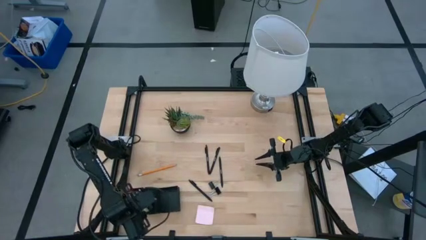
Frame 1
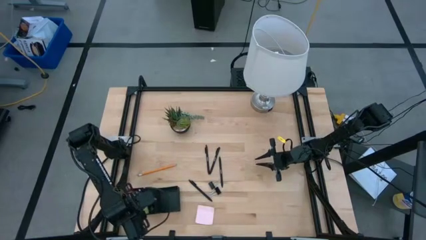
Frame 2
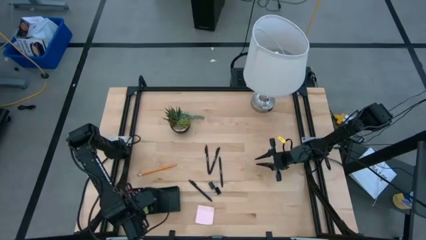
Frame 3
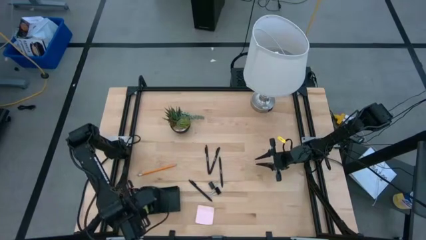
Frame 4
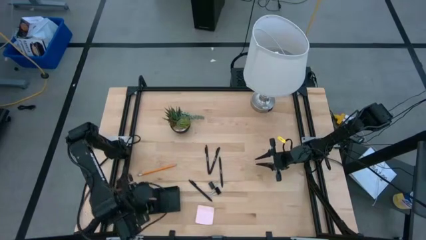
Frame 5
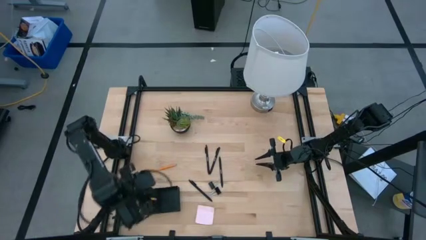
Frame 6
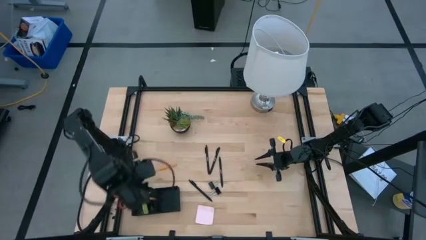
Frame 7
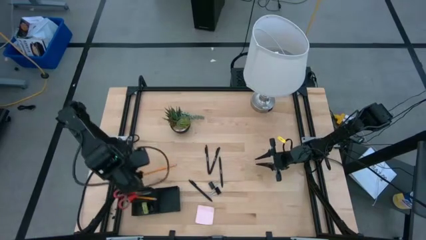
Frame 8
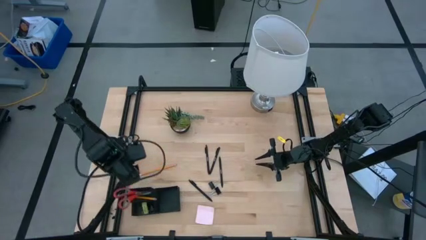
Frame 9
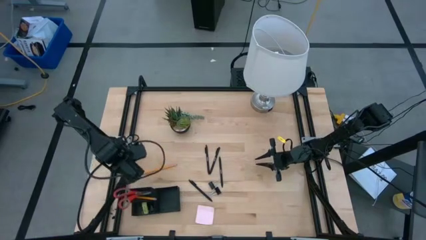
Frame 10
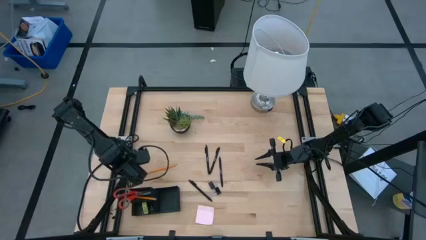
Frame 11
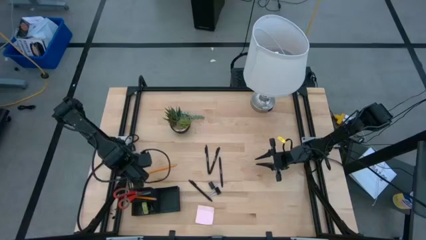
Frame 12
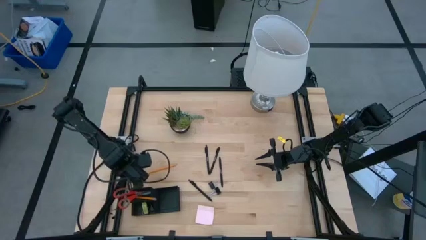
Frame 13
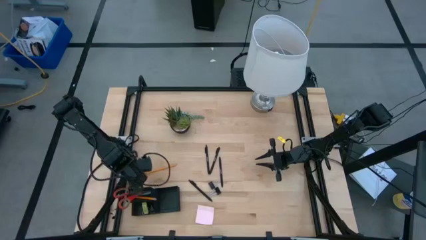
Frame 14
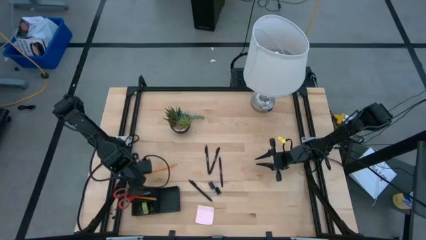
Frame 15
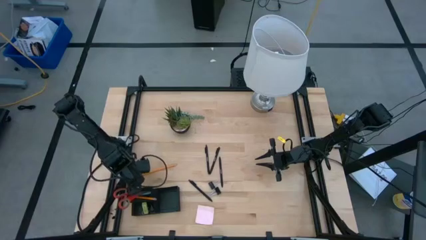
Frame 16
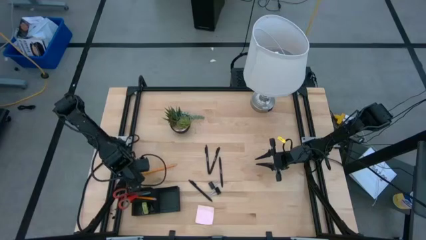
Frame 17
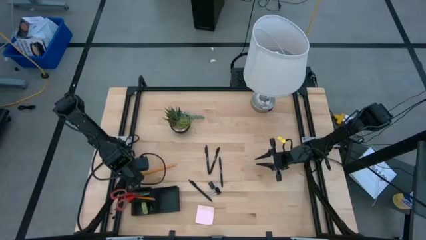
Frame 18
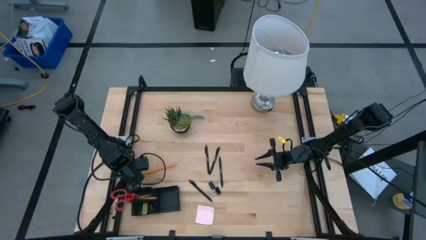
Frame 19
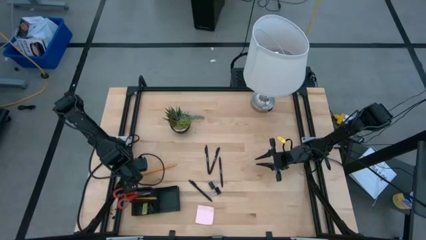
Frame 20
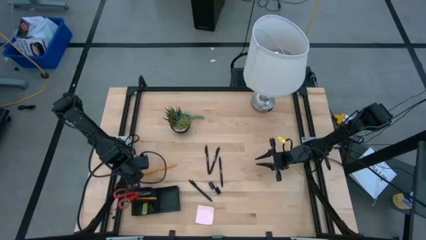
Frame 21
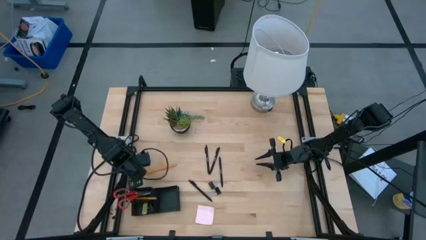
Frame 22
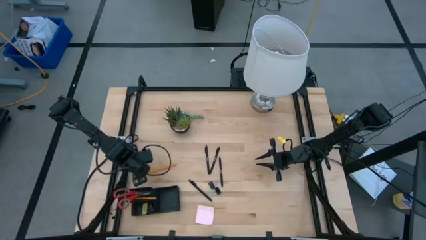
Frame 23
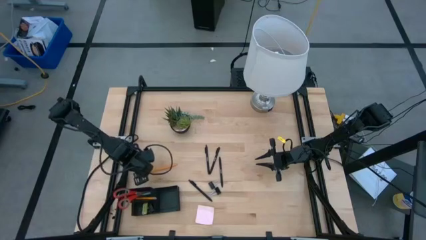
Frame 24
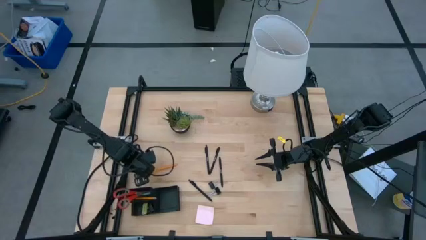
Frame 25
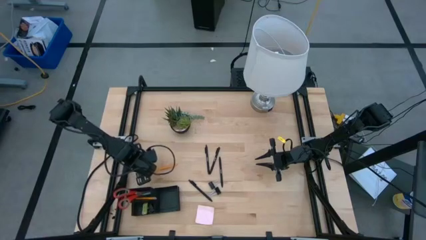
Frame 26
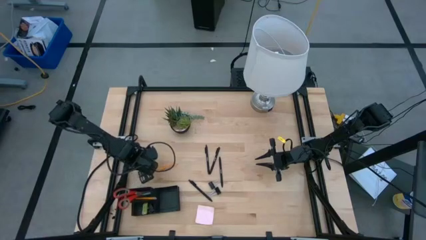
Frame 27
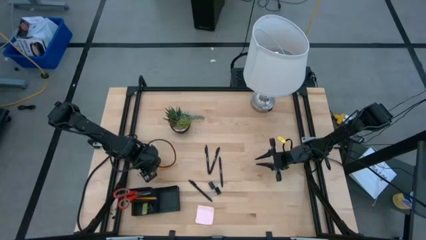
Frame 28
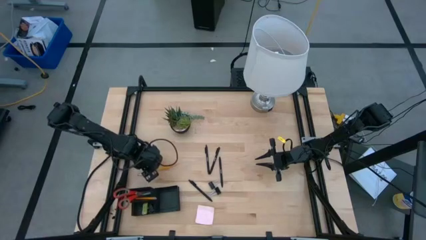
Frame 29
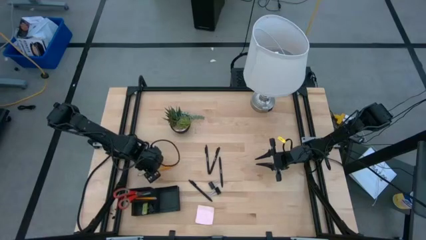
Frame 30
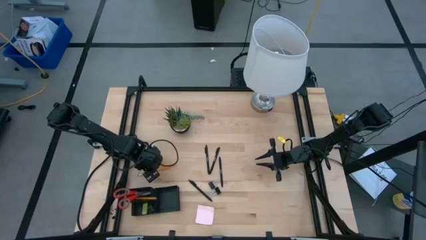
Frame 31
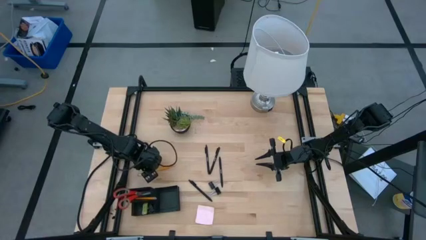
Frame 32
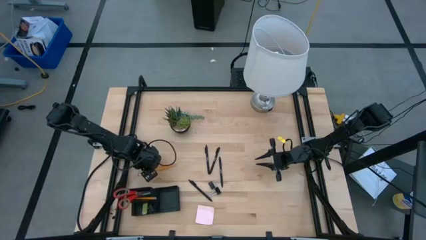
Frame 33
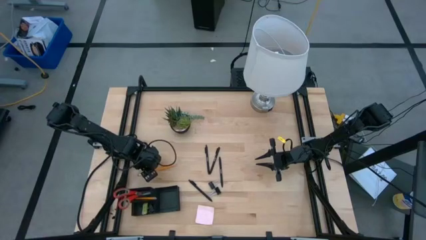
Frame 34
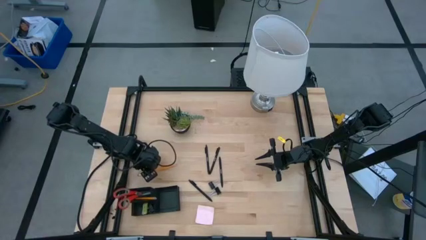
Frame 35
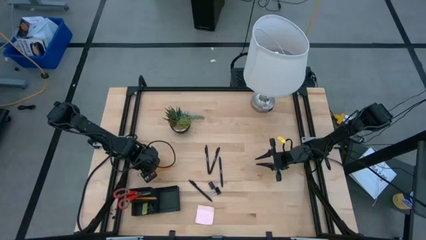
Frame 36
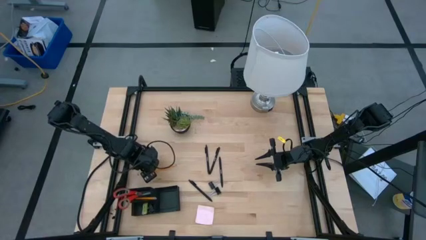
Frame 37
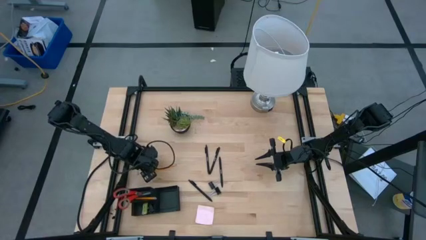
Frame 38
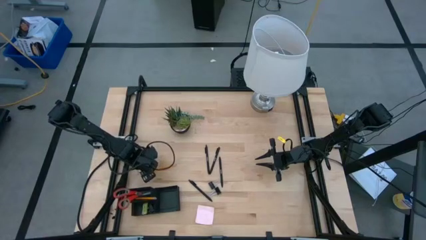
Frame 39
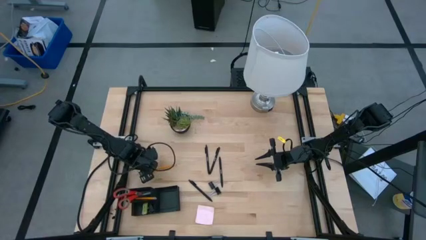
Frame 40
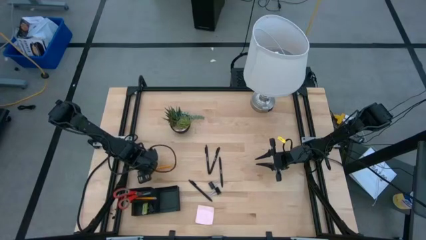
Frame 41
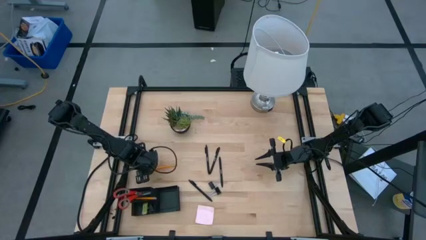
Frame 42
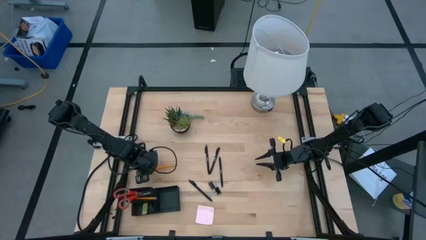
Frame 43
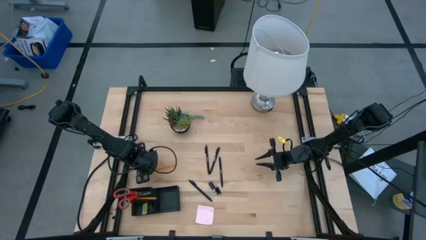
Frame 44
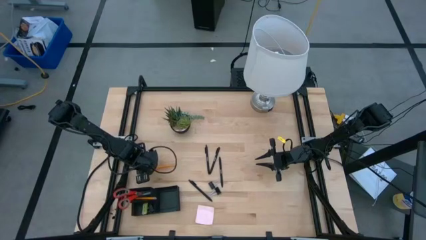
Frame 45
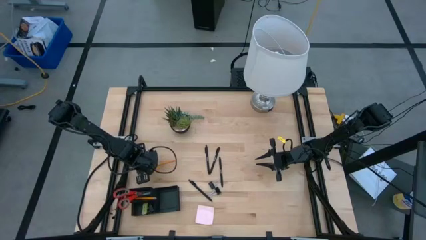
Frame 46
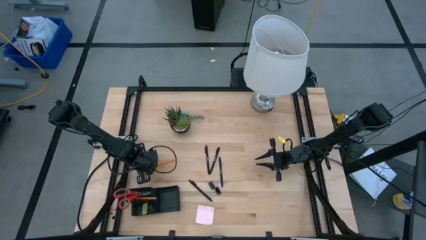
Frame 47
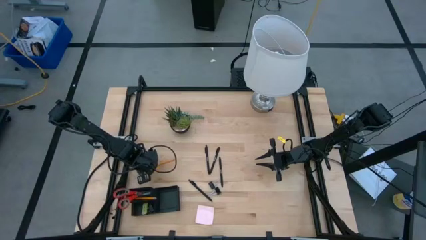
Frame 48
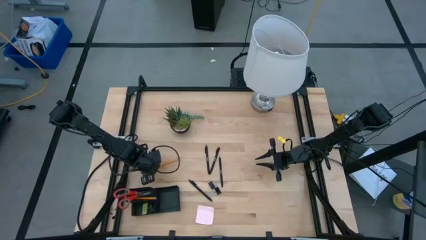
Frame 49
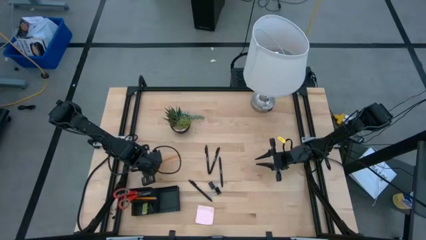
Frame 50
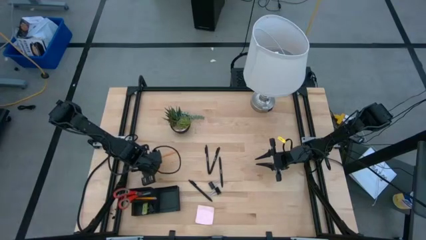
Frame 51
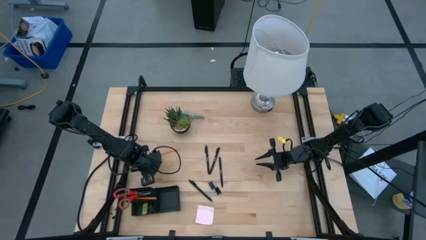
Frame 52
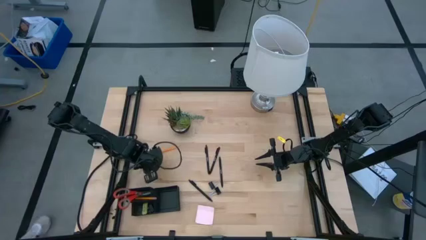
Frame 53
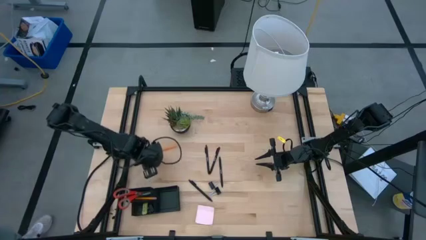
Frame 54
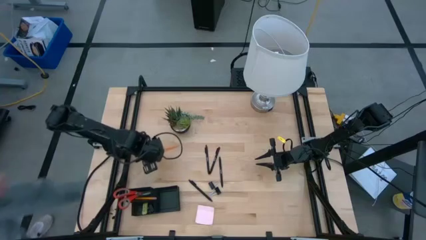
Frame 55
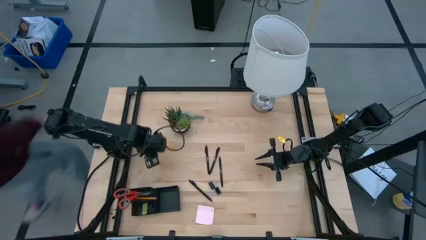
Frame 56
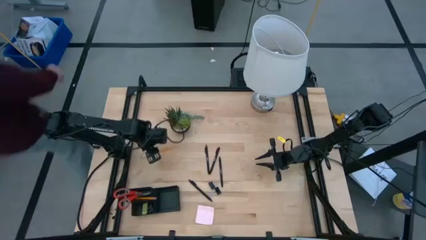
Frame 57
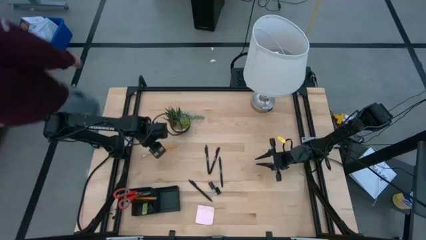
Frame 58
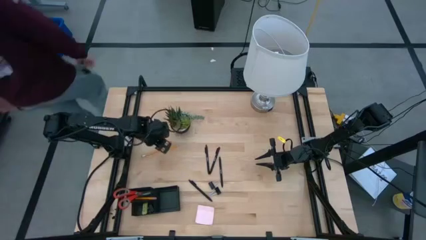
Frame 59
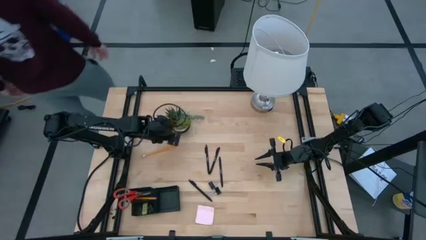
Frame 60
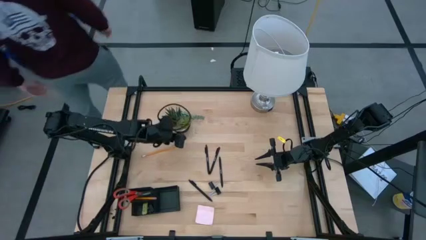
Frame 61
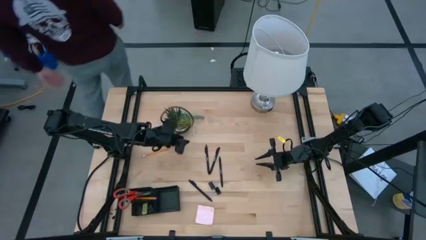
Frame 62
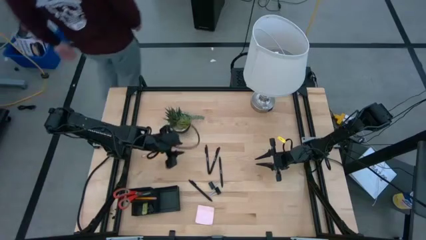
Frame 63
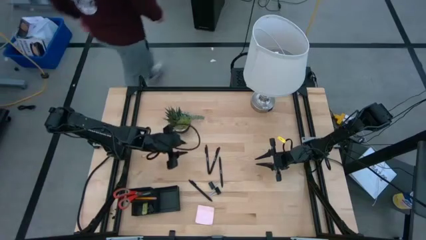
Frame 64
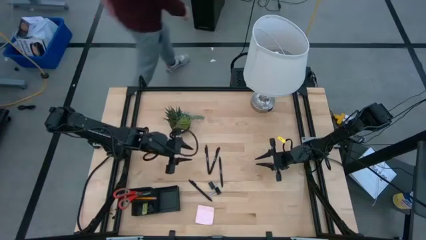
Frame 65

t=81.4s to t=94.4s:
Task: Pick and place office supplies into organizer
Put the pencil into the top left section of the desk organizer

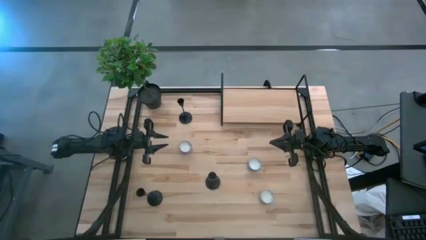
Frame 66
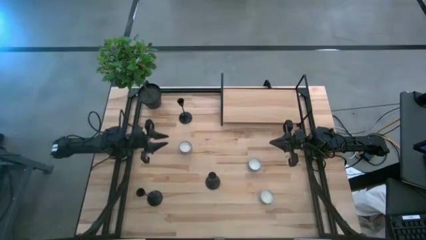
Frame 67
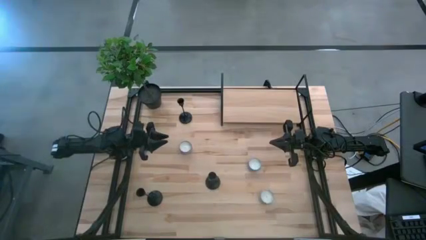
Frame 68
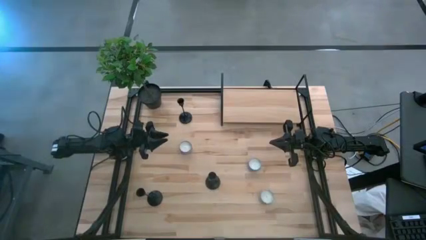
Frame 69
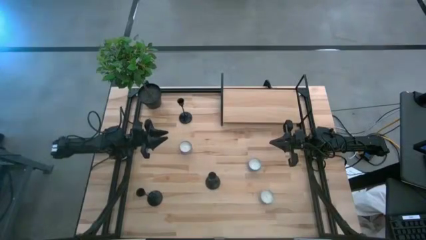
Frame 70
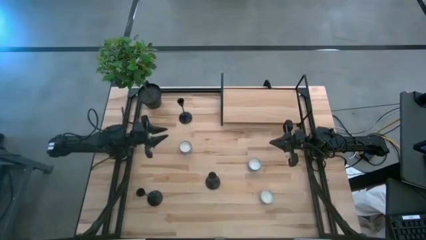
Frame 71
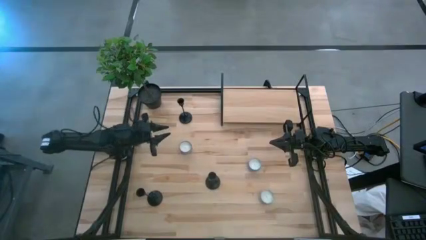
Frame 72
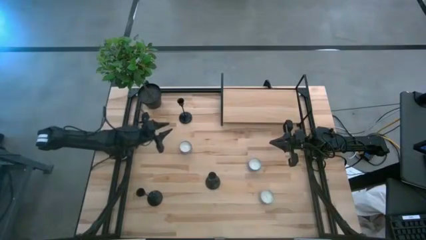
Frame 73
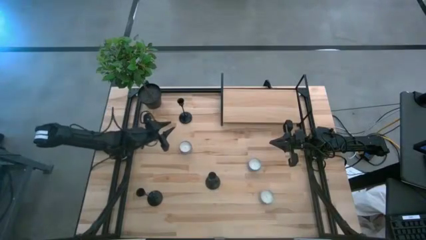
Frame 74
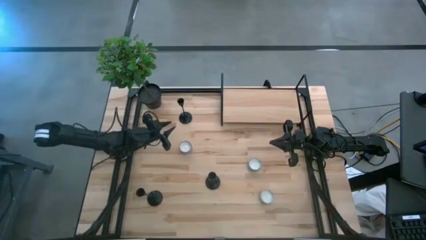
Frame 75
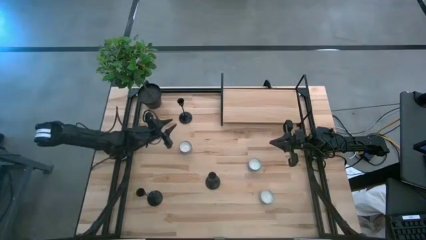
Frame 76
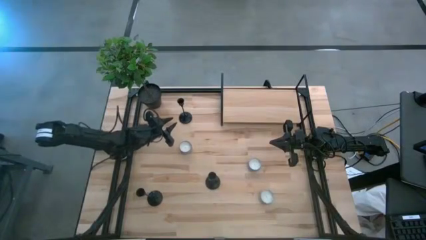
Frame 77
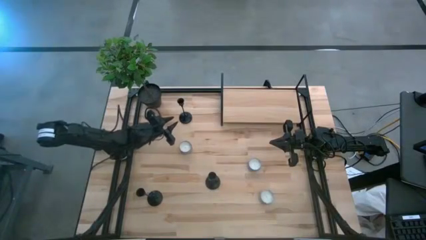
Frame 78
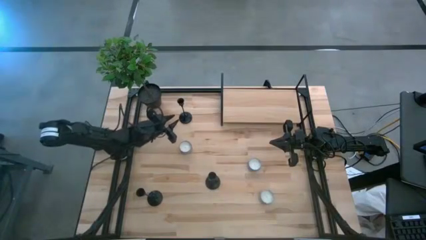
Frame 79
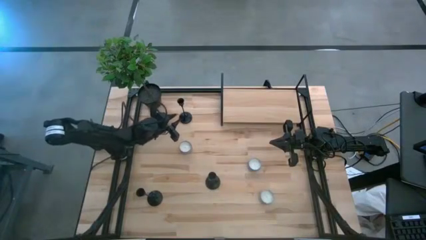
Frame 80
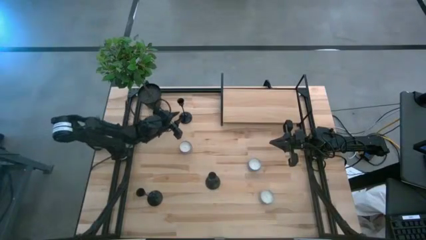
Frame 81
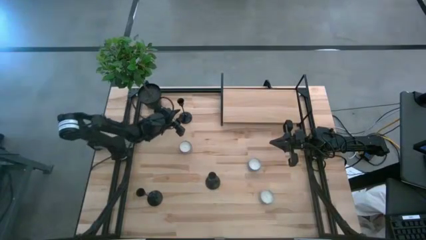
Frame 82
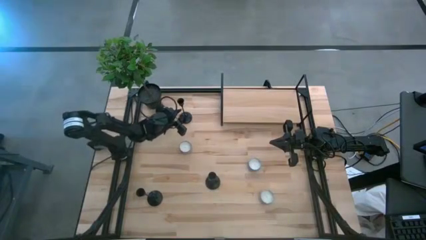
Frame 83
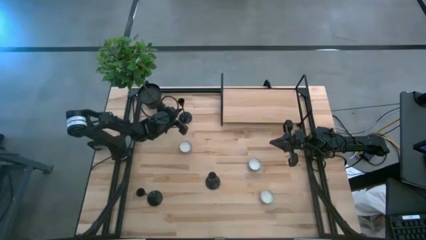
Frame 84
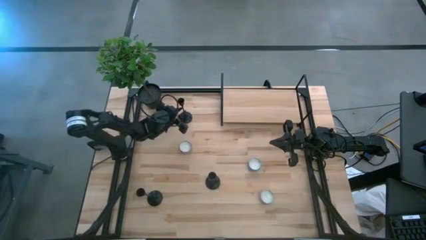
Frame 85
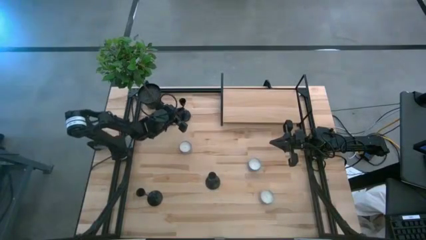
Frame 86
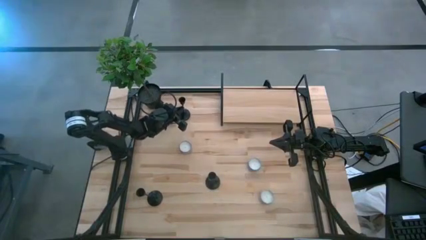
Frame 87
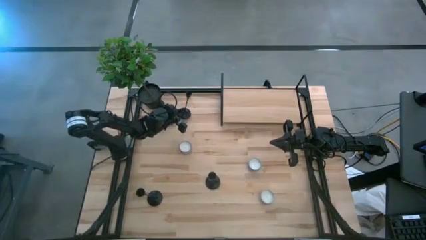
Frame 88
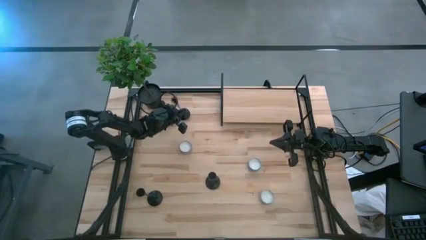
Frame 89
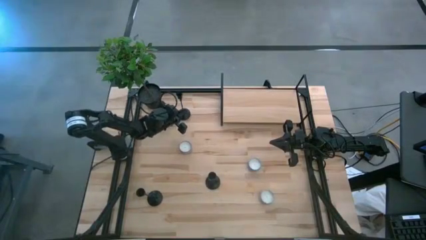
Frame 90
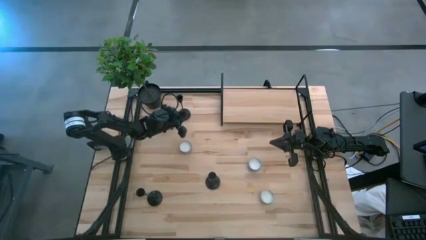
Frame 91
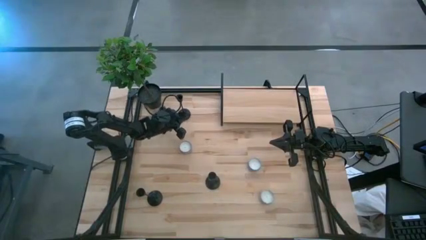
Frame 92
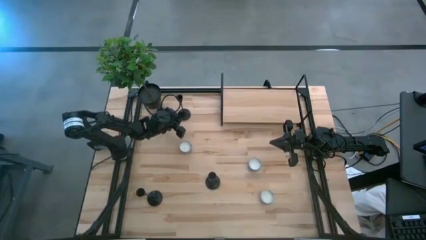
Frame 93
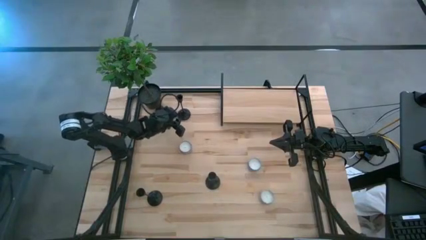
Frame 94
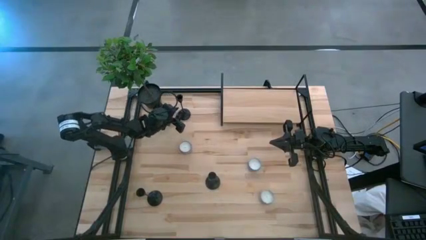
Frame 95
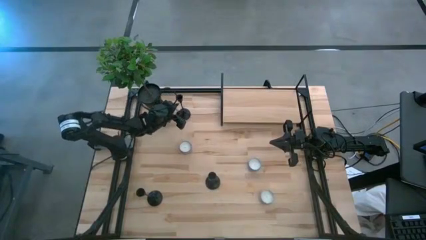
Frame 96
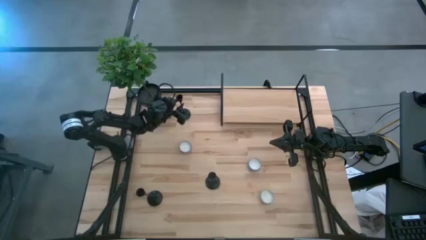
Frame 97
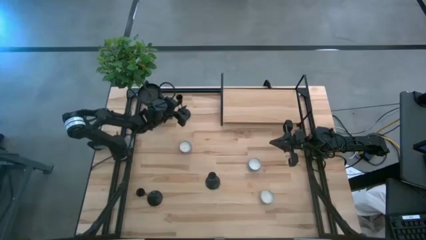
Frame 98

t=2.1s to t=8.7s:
Task: Pick & Place candle stick holders
Put the top black candle holder on the shelf
